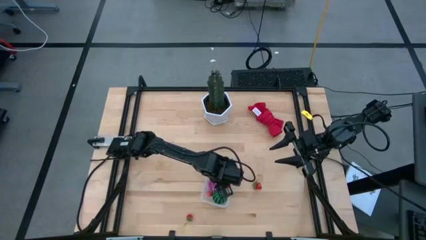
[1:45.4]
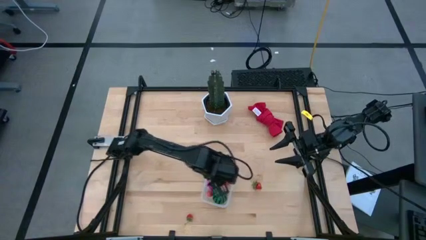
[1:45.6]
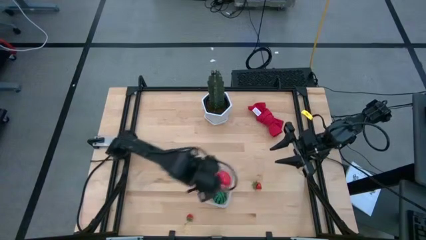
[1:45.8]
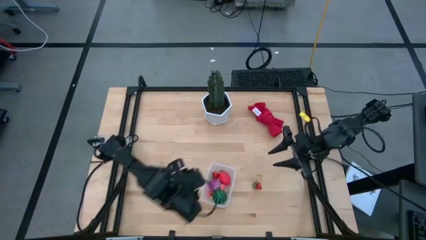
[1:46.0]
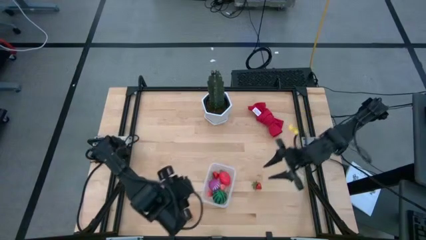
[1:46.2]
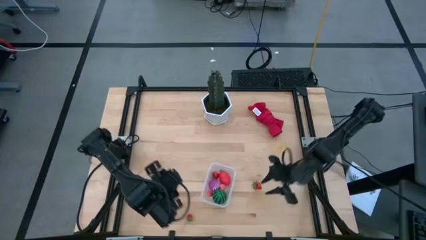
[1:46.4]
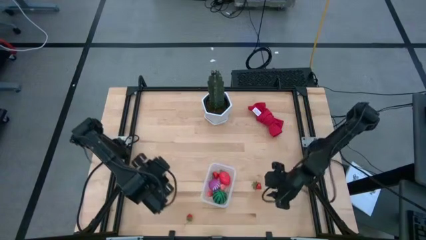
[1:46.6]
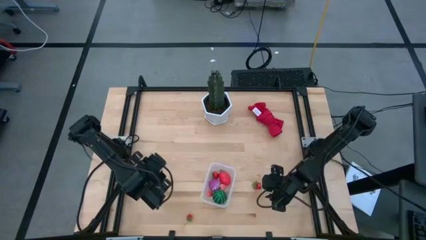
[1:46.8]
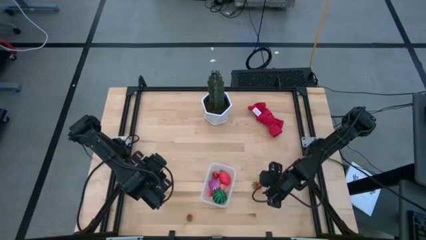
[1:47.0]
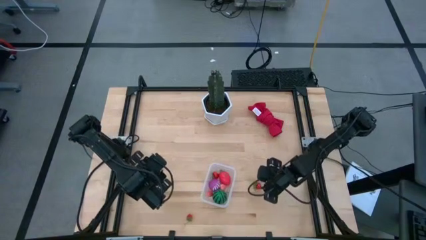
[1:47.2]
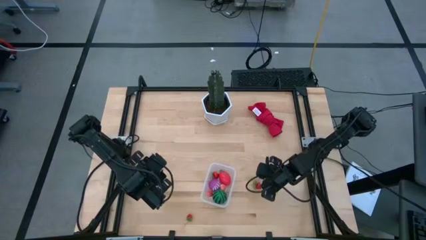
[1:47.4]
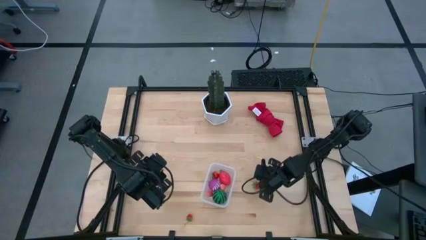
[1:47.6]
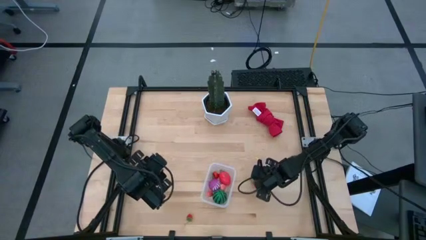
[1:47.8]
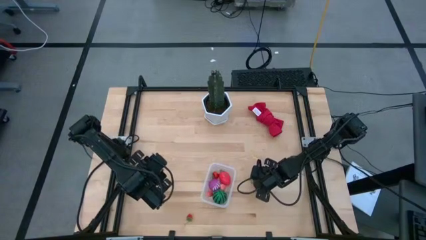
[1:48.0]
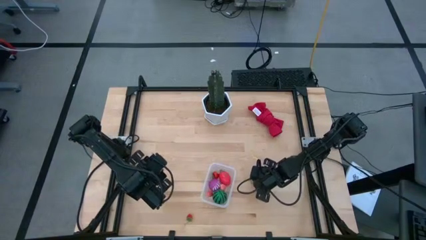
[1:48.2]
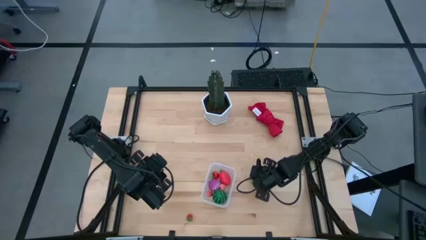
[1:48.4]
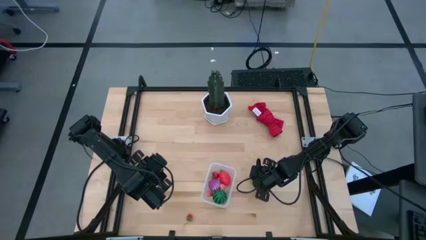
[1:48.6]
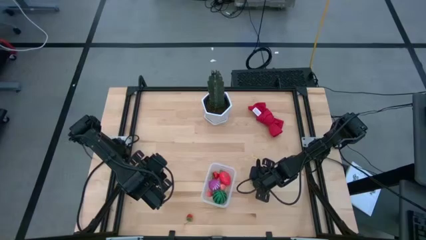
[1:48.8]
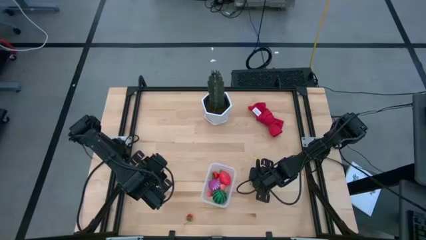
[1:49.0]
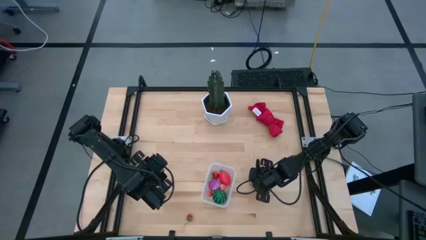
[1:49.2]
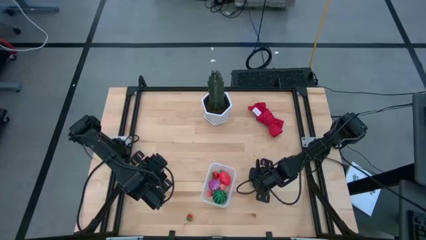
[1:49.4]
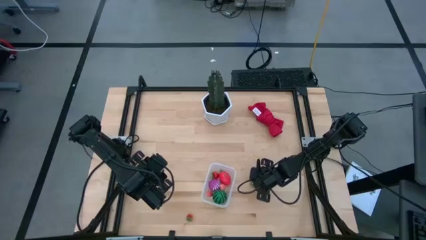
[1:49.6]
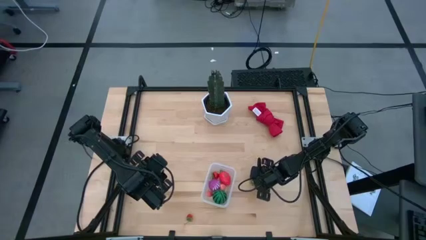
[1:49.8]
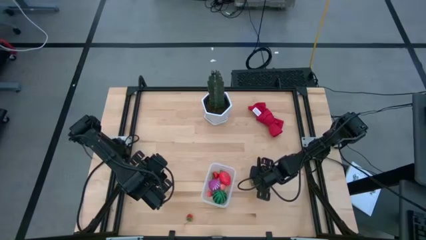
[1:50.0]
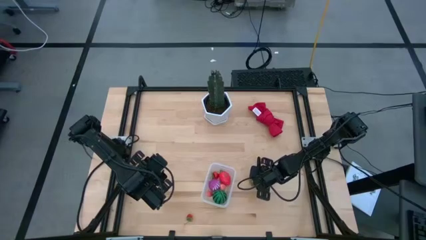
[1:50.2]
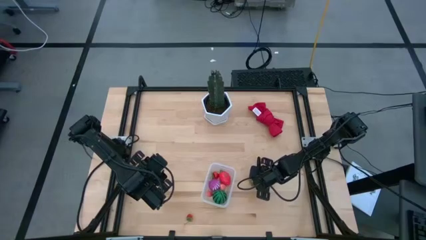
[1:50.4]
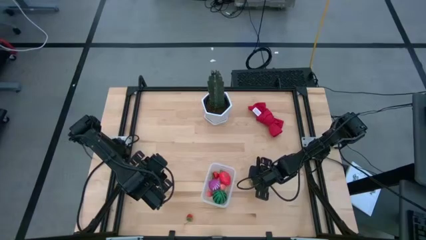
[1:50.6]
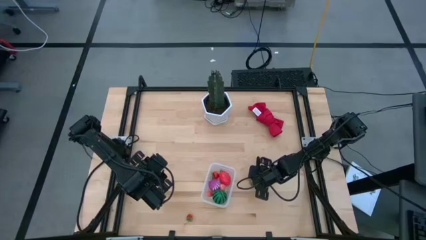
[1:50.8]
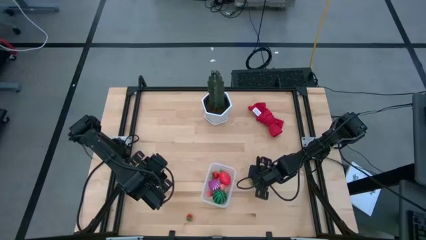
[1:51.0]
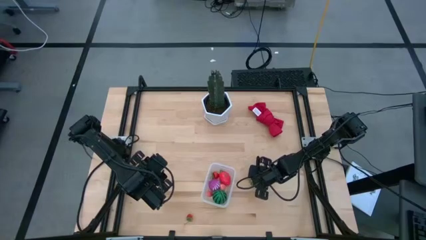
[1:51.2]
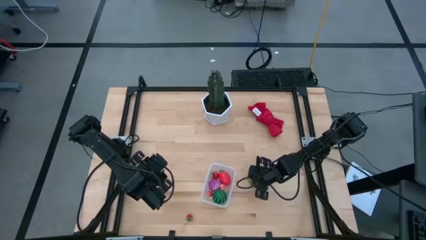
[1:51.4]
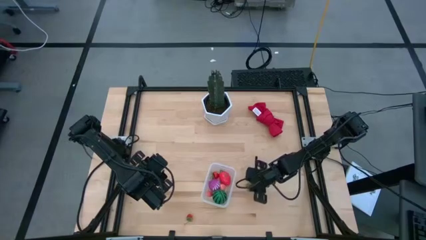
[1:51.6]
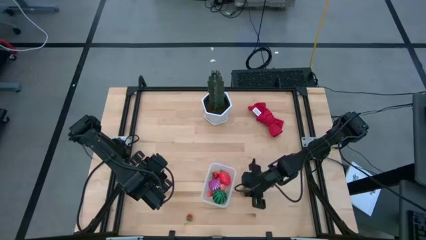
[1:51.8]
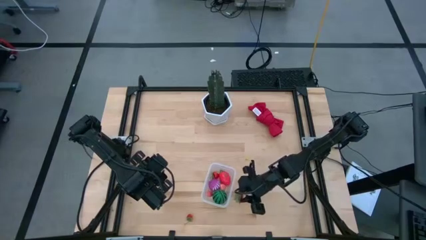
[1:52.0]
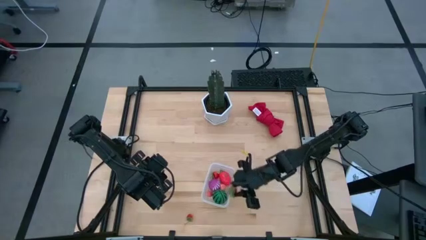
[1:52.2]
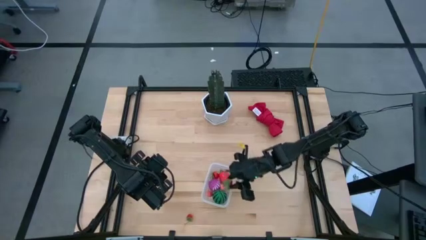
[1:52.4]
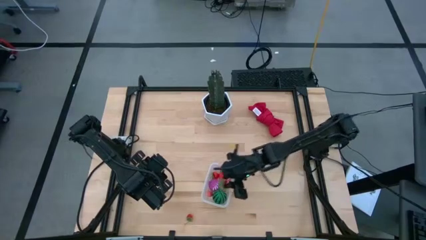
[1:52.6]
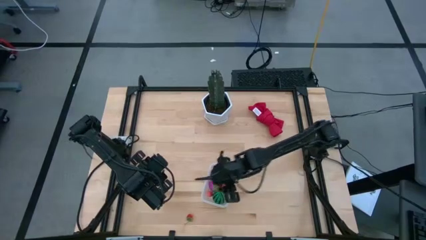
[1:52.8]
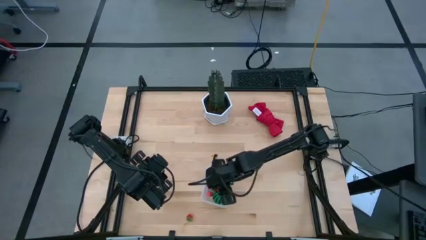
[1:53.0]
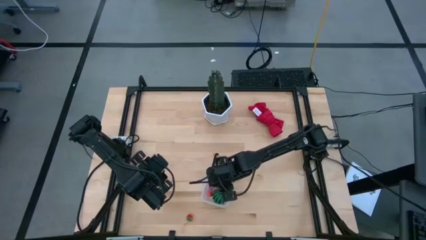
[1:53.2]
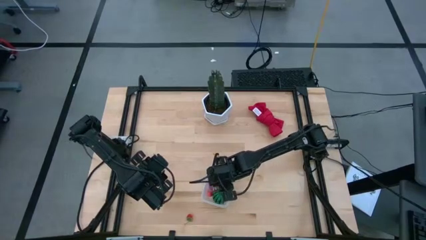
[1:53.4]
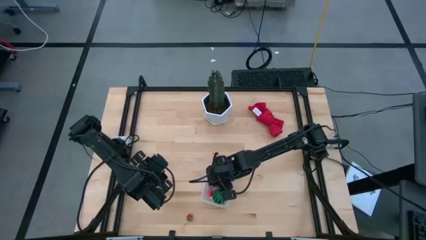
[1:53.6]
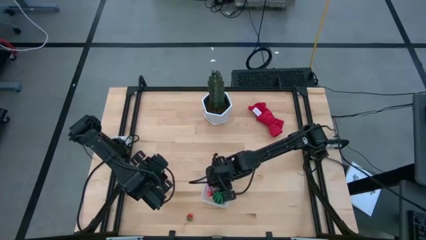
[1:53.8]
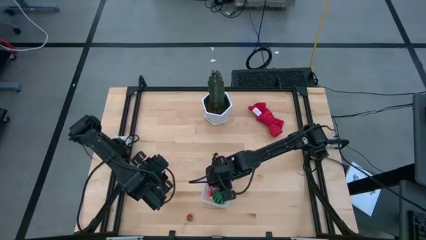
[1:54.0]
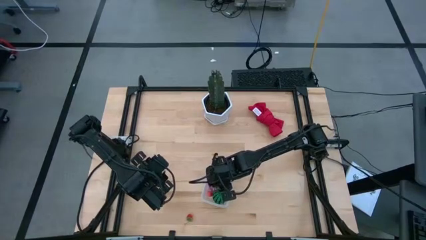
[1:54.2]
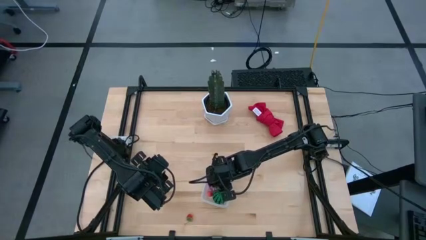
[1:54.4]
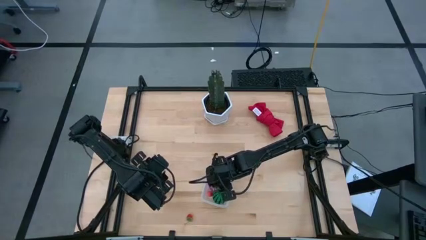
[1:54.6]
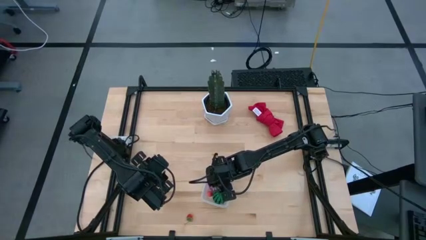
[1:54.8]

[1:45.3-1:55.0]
Task: Pick and placing Produce into tupperware
Put the top red strawberry into the transparent bin

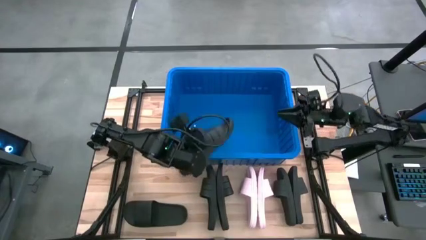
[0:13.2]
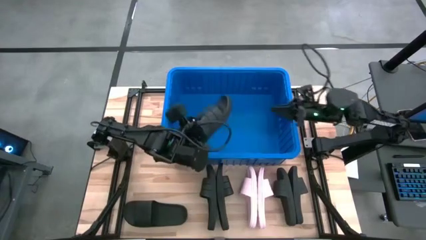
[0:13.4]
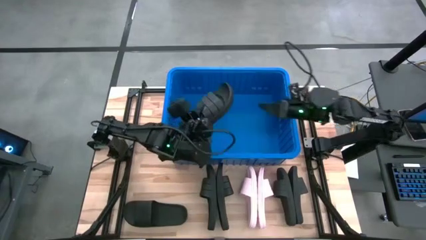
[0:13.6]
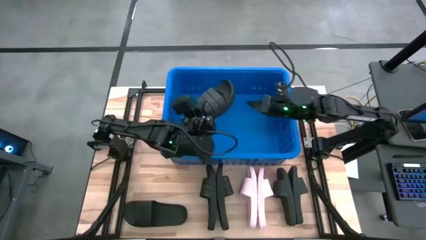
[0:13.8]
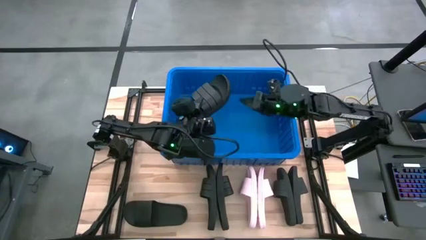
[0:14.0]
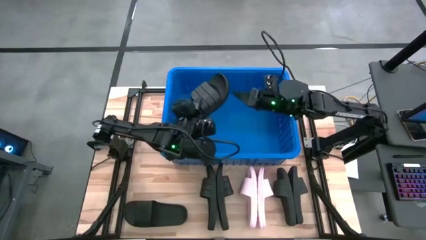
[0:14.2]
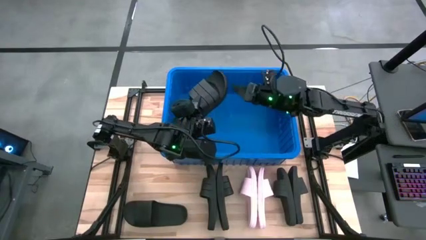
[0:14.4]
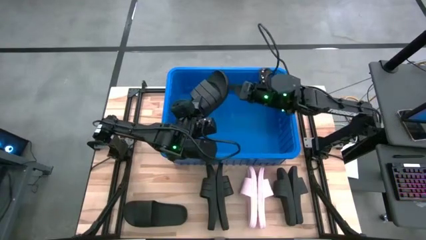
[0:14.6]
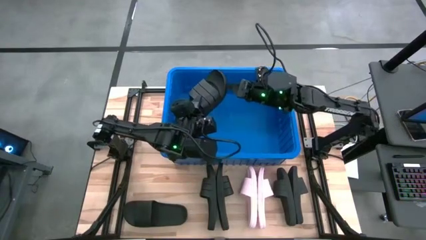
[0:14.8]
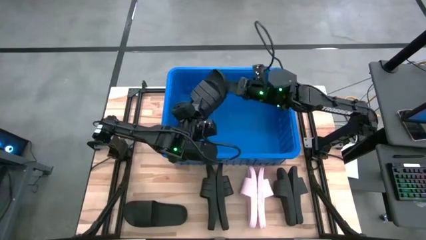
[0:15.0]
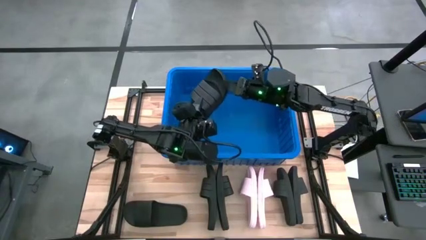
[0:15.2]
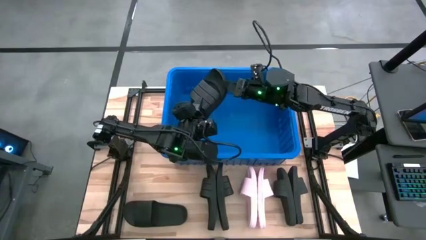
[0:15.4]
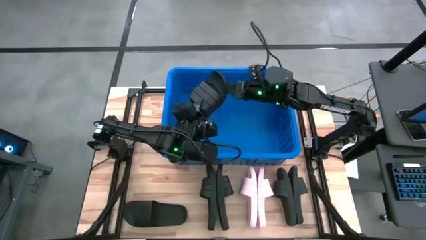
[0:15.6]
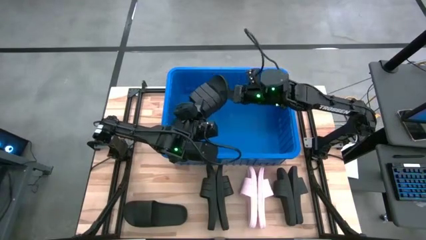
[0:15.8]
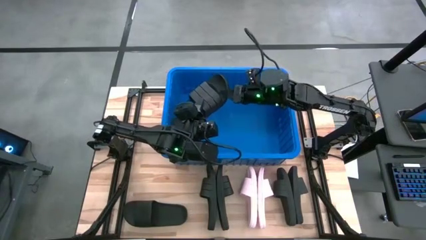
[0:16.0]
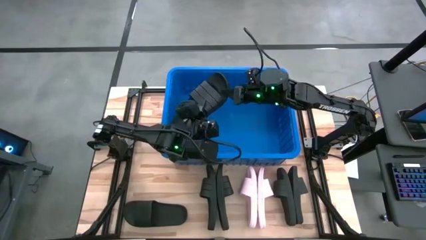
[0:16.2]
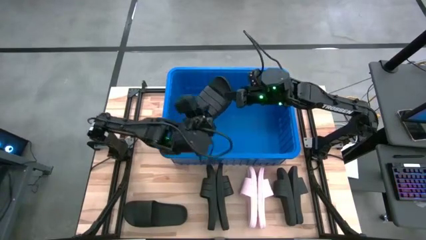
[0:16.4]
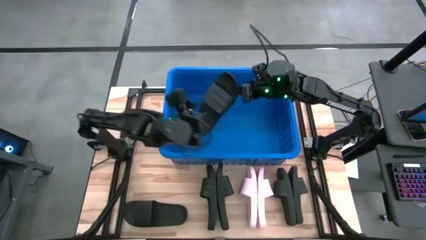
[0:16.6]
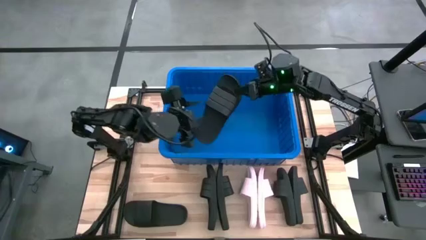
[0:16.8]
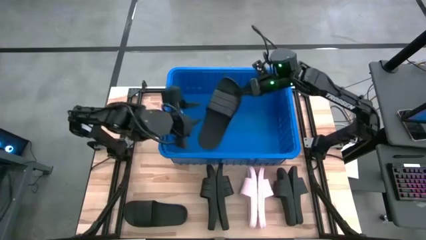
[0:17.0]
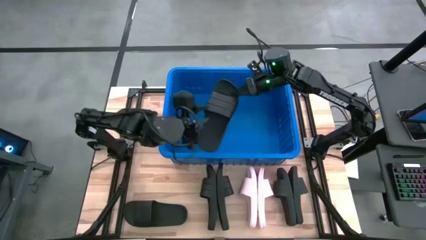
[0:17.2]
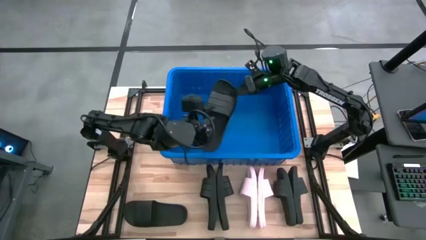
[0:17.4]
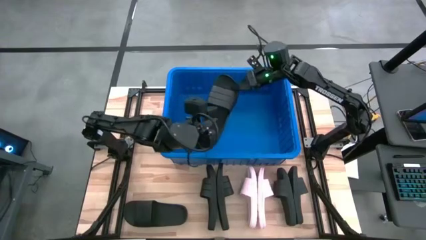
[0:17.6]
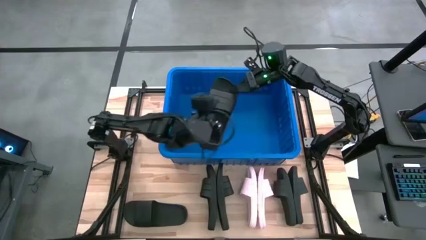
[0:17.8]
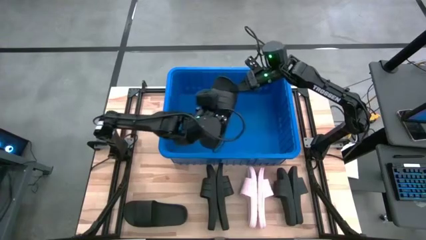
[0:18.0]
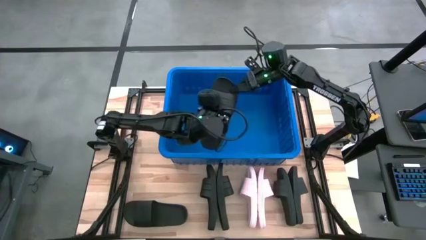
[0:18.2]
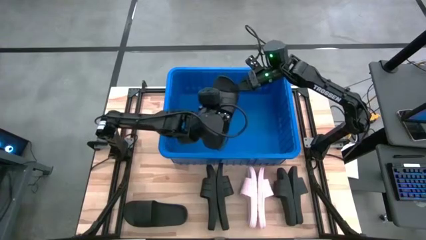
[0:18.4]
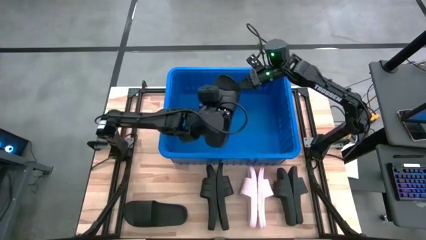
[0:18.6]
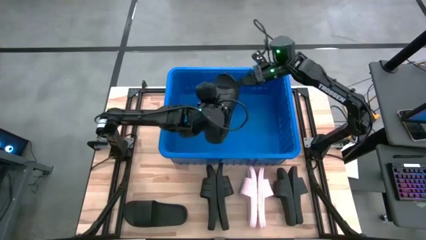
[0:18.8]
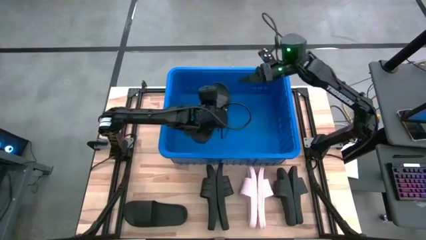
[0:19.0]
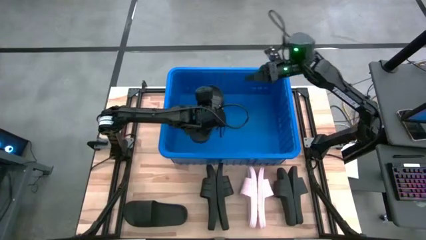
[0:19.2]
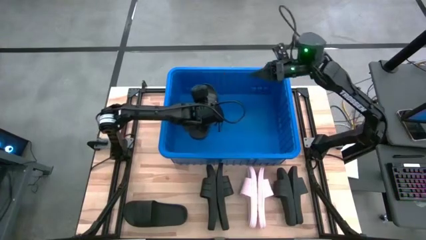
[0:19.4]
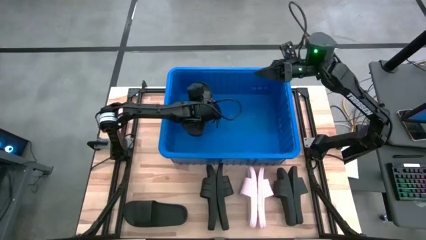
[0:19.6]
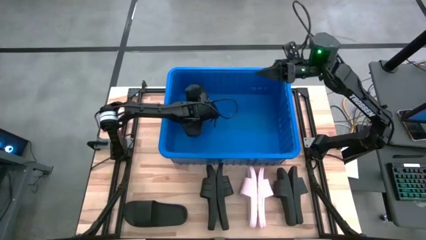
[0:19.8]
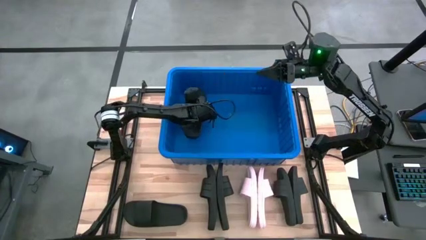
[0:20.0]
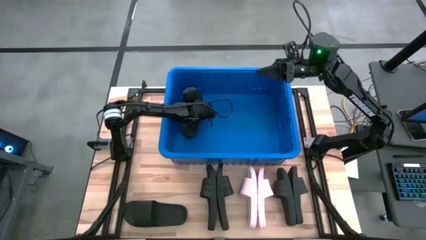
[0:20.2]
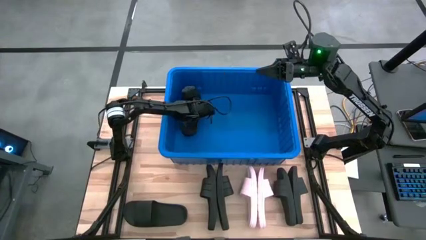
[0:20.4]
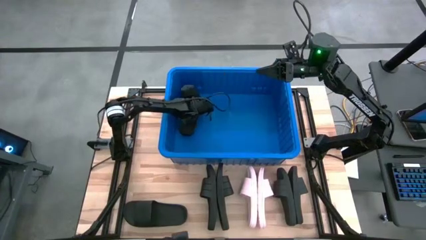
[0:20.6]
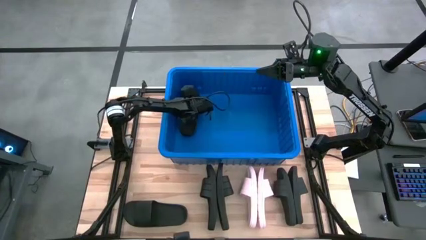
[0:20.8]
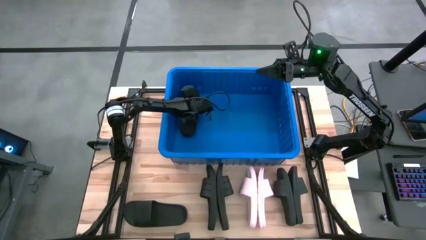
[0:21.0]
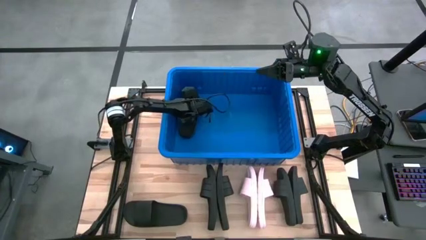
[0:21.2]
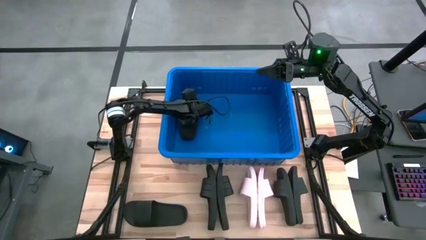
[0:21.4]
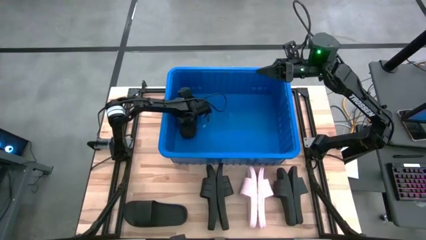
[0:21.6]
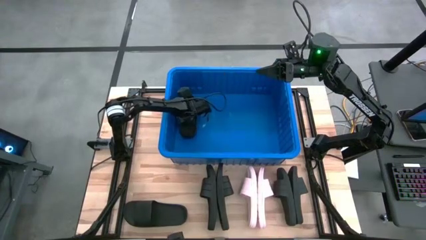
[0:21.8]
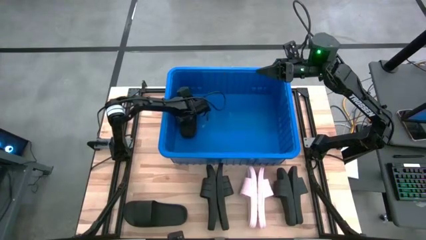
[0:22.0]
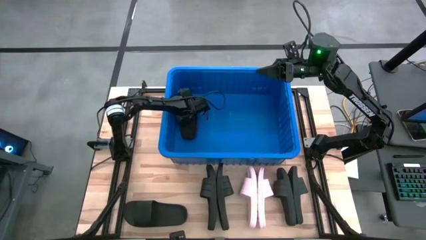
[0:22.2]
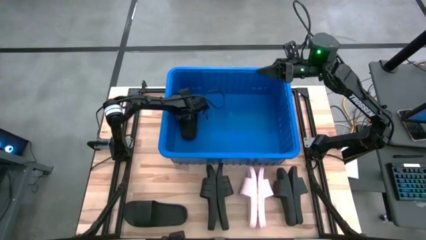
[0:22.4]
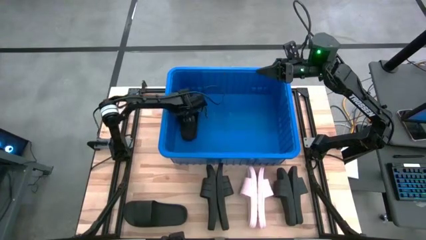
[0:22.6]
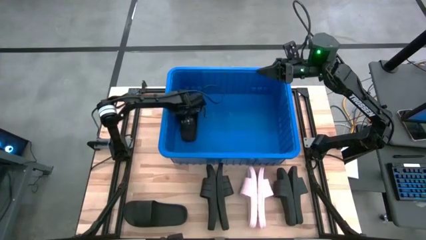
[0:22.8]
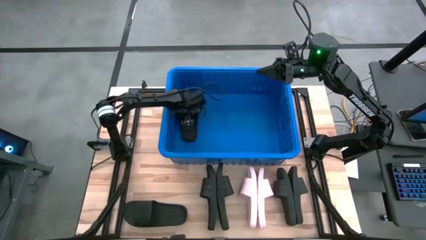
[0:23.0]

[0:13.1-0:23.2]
Task: Pick and place slides into bin
Put the black slide into the blue bin
